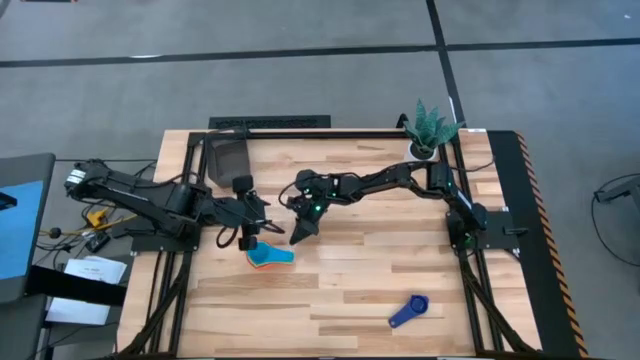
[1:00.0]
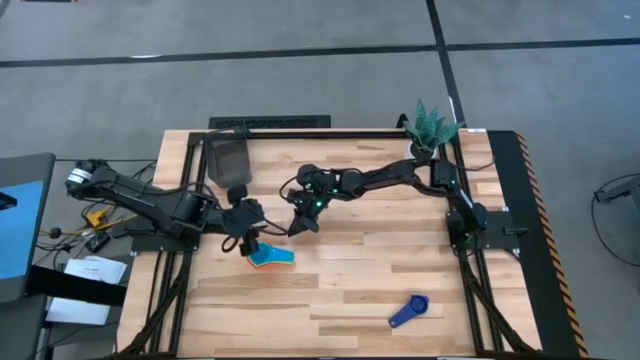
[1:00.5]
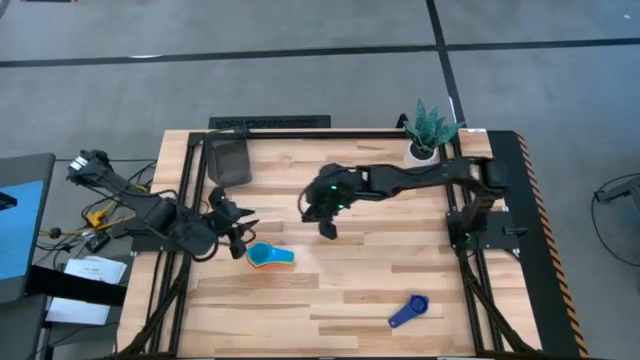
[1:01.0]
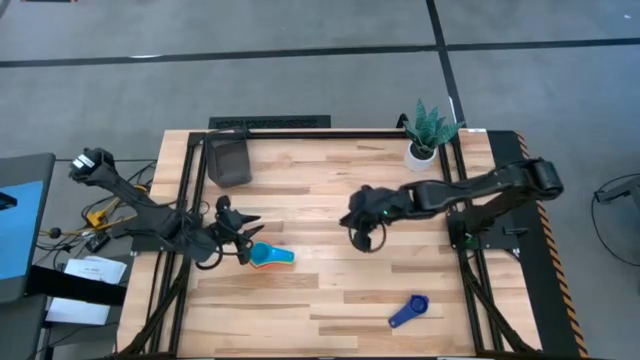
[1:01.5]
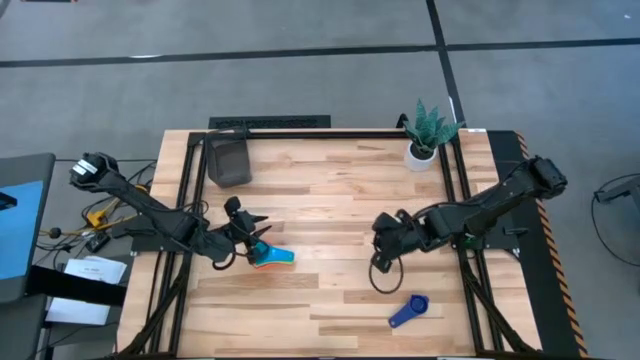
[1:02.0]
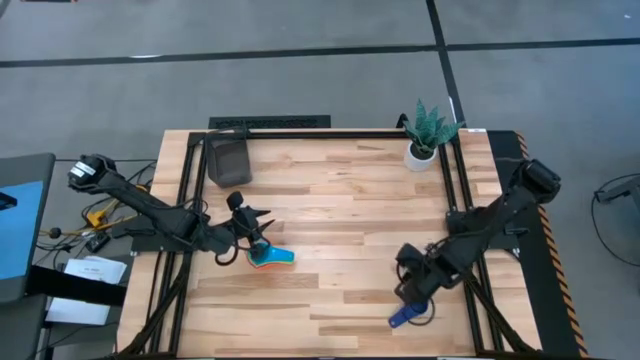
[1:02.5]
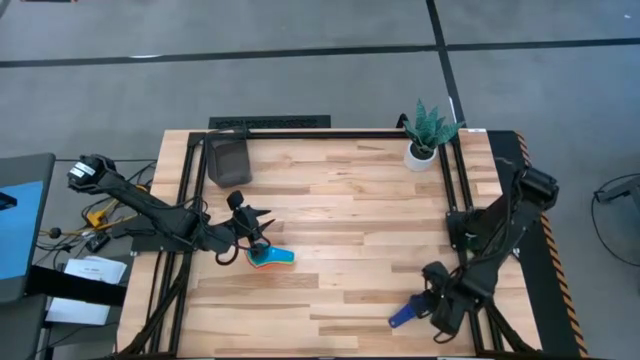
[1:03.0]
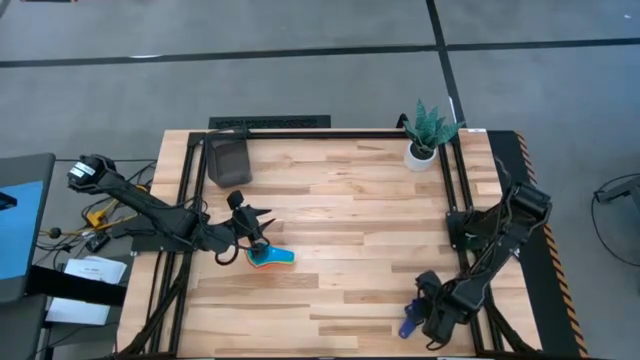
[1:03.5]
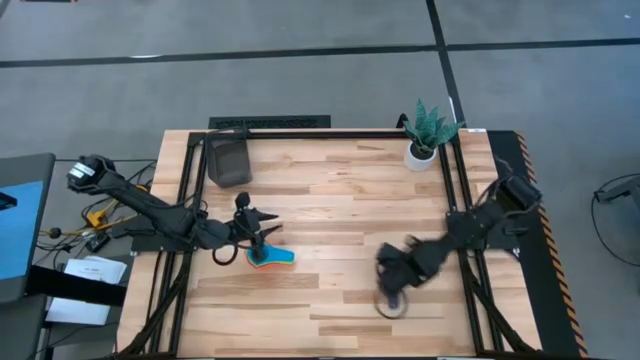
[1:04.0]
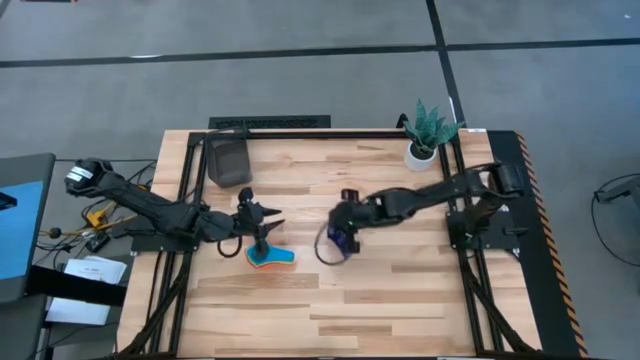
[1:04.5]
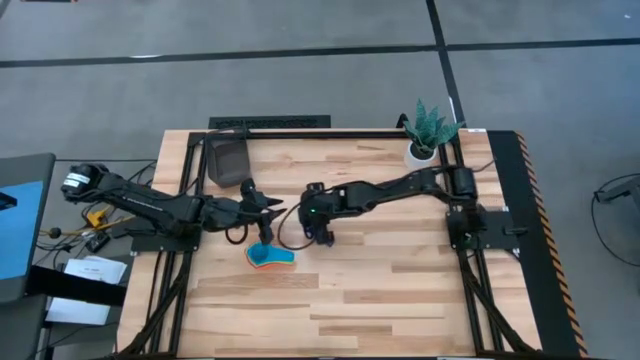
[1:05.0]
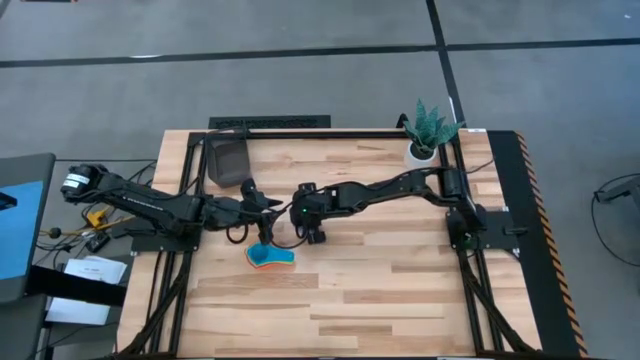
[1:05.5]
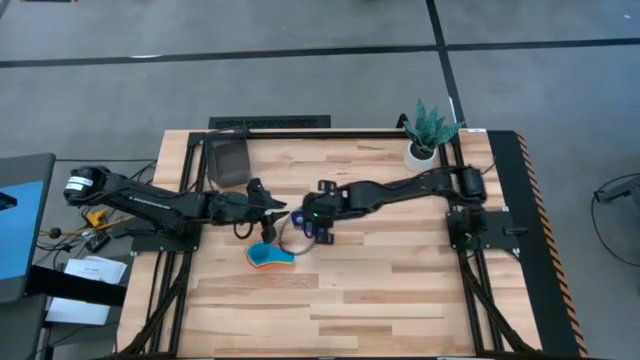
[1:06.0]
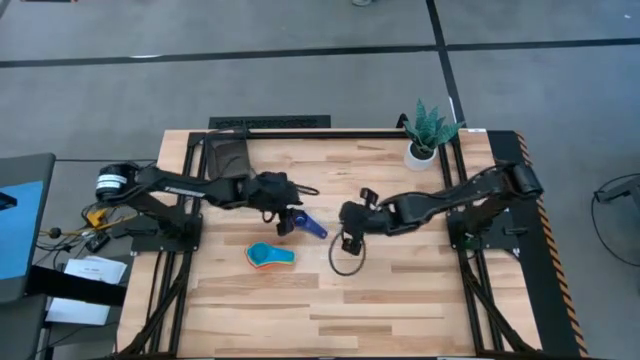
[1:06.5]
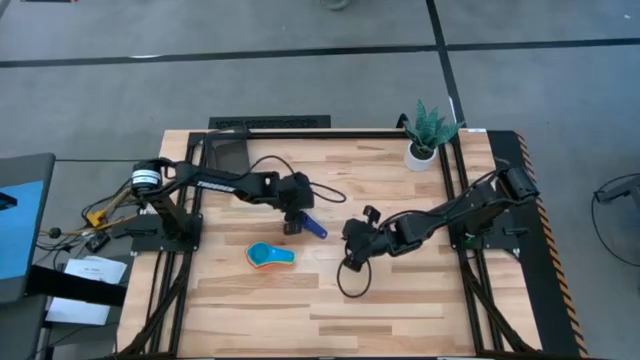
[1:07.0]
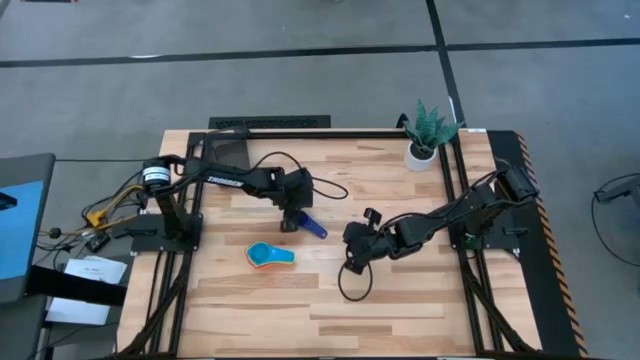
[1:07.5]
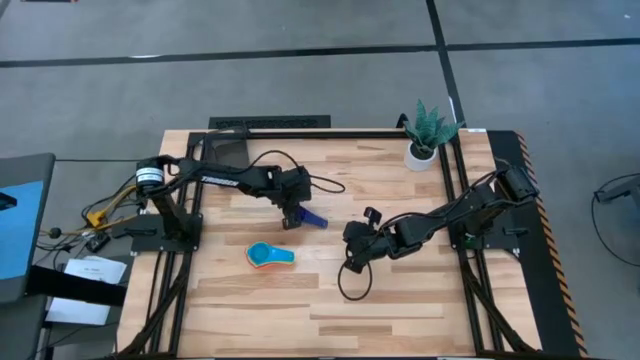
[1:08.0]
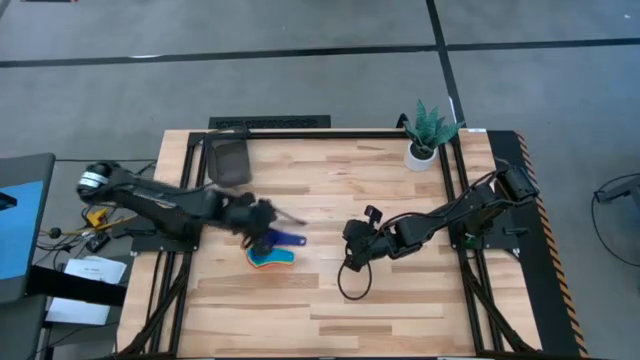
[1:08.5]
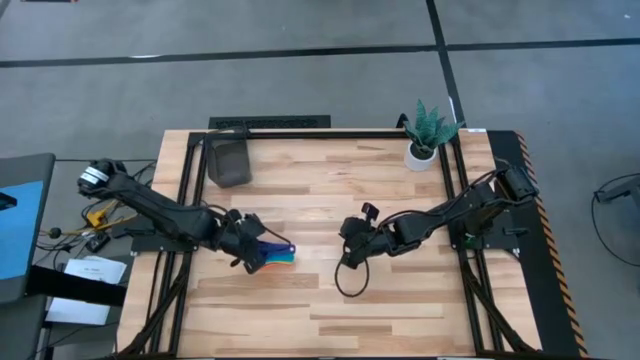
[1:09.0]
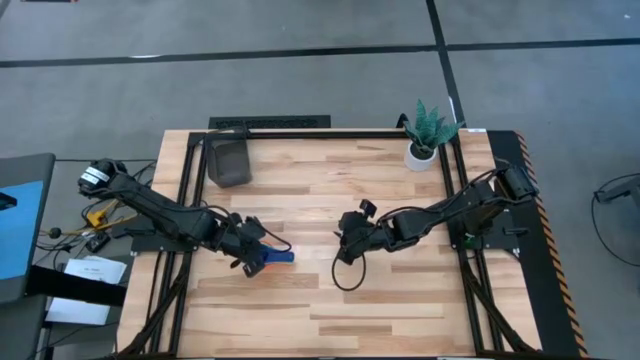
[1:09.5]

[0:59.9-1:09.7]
Task: Nest measuring cups in basket
Stack the dark blue measuring cup on top of the light blue measuring cup

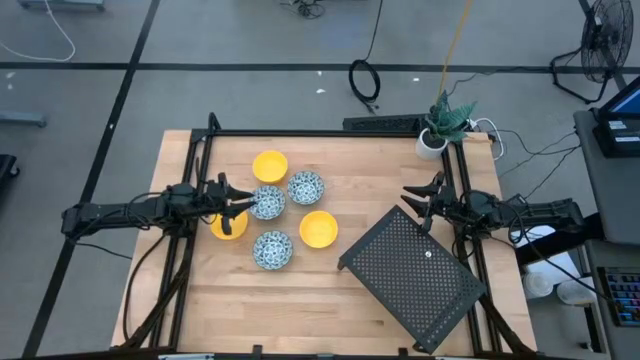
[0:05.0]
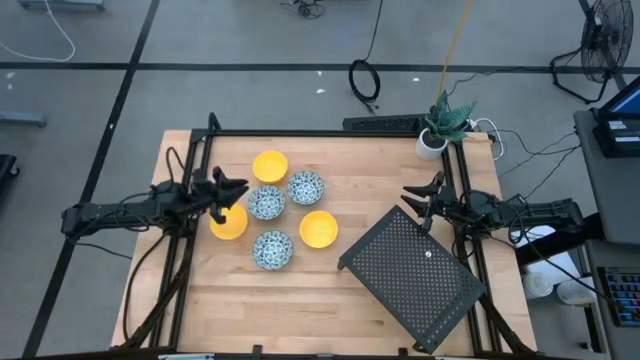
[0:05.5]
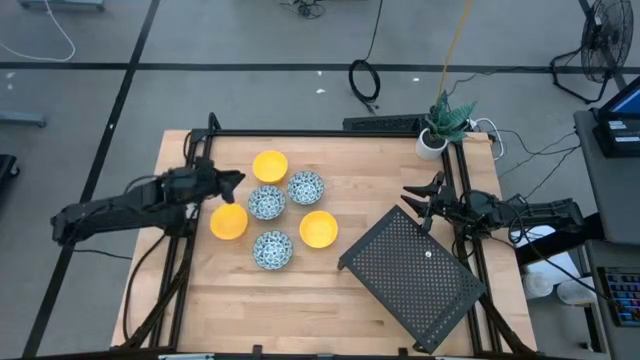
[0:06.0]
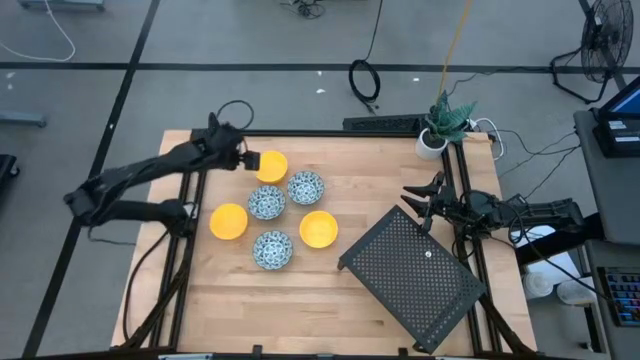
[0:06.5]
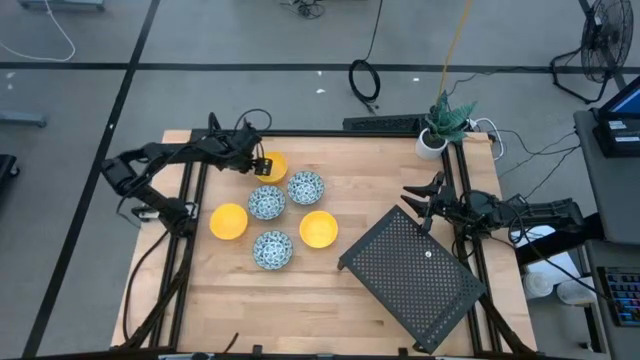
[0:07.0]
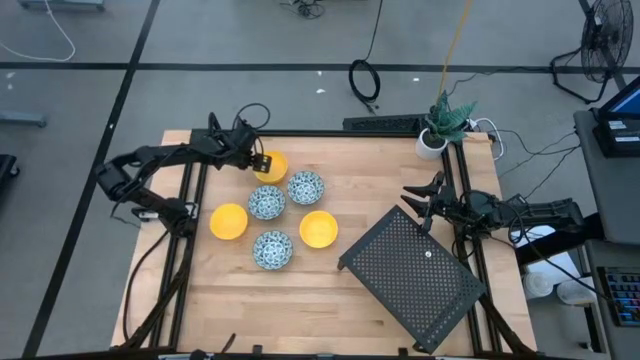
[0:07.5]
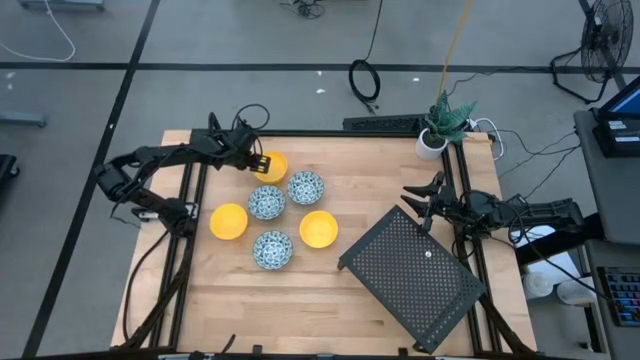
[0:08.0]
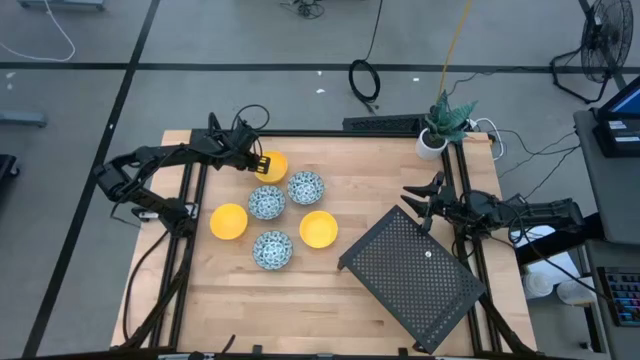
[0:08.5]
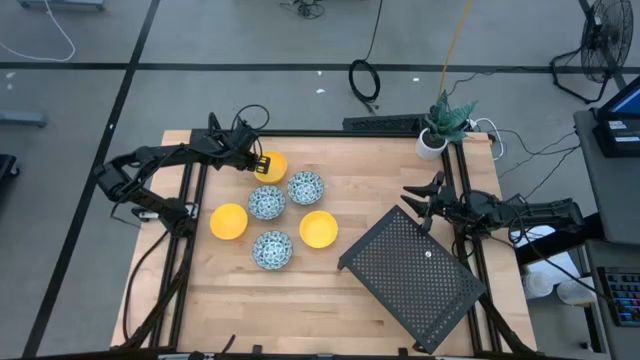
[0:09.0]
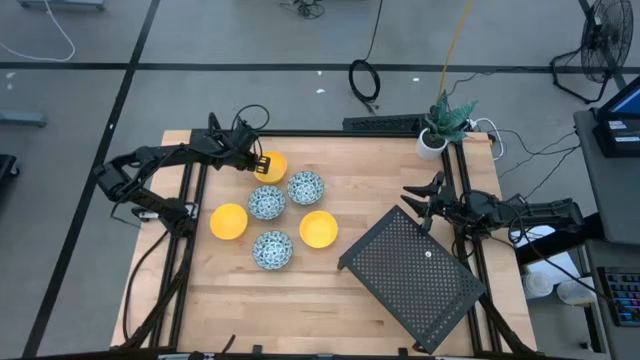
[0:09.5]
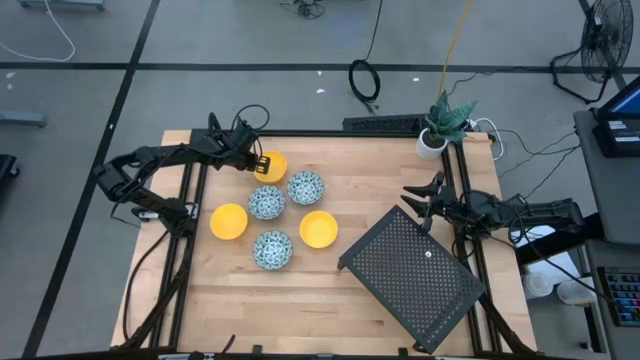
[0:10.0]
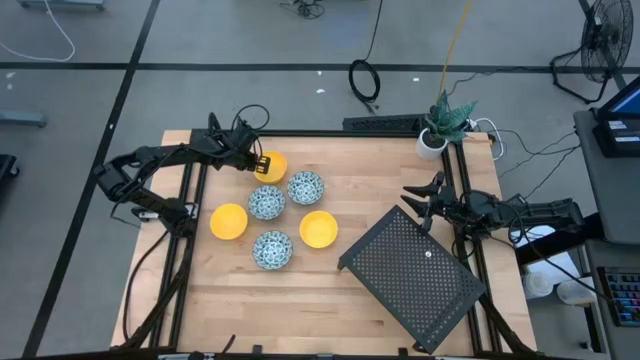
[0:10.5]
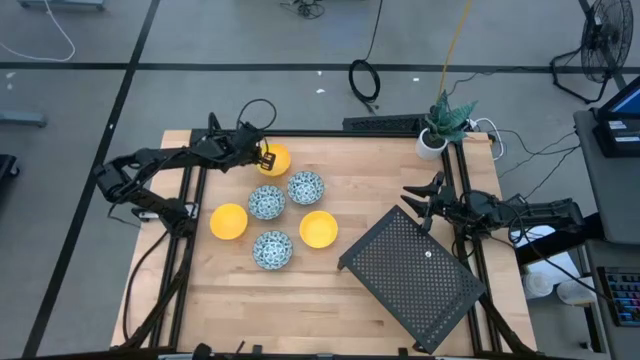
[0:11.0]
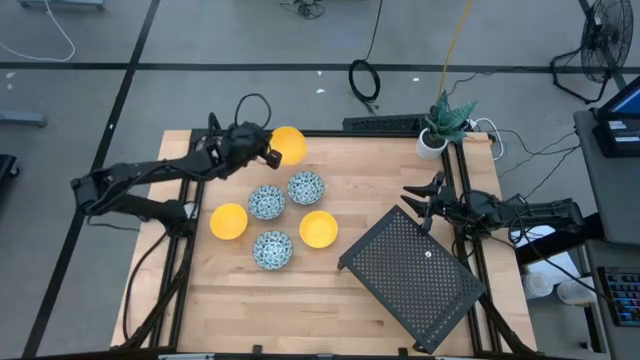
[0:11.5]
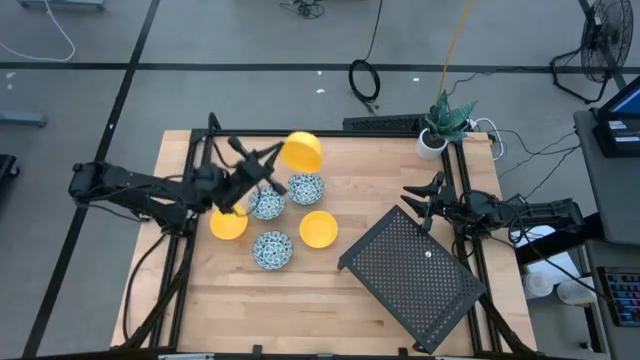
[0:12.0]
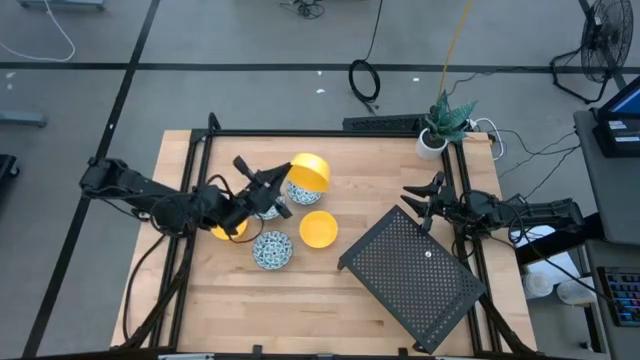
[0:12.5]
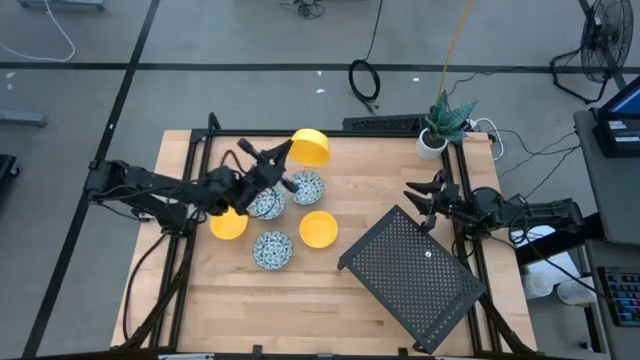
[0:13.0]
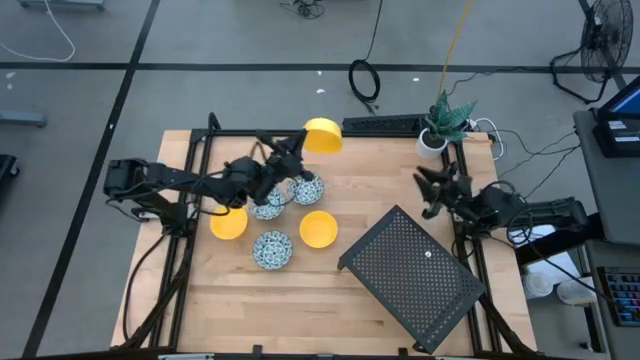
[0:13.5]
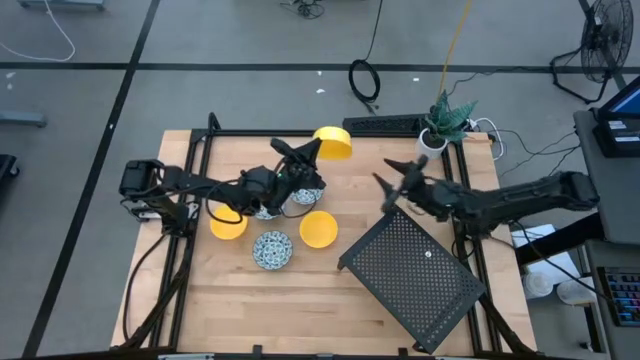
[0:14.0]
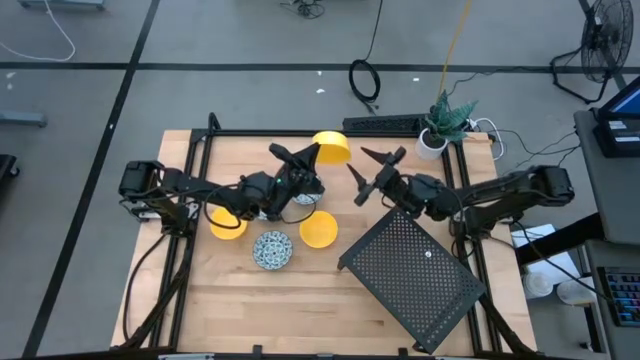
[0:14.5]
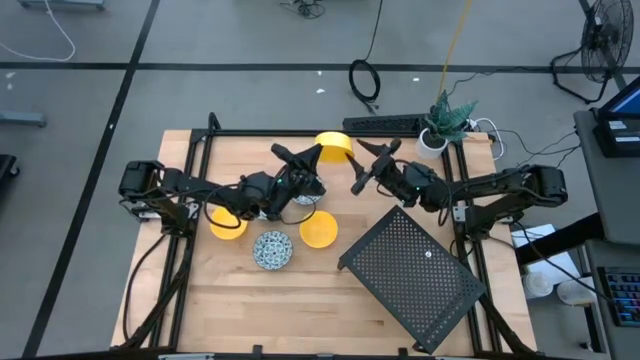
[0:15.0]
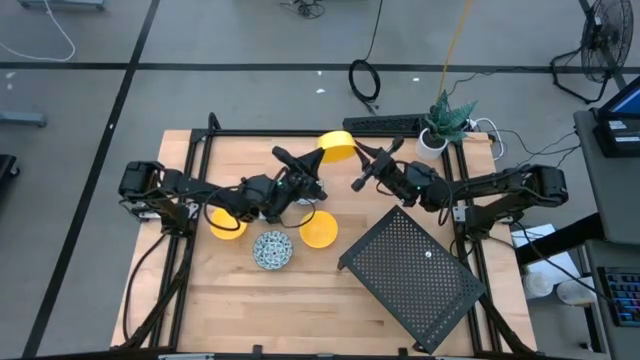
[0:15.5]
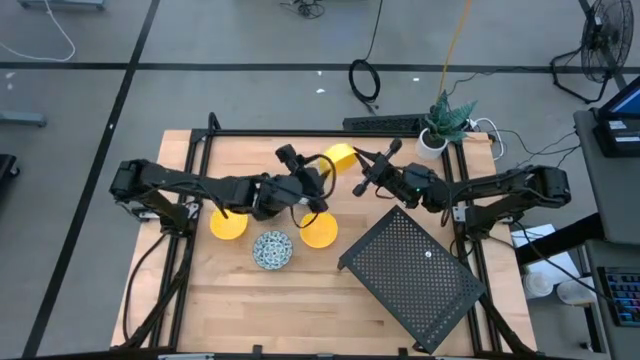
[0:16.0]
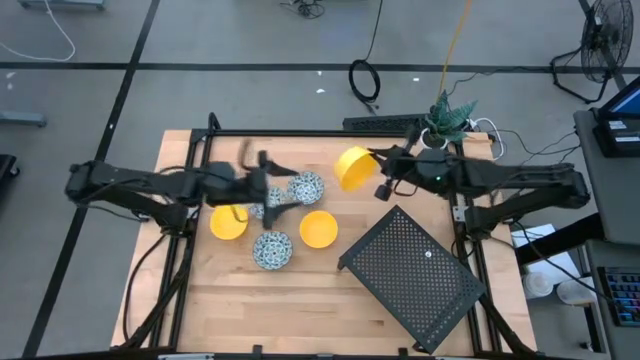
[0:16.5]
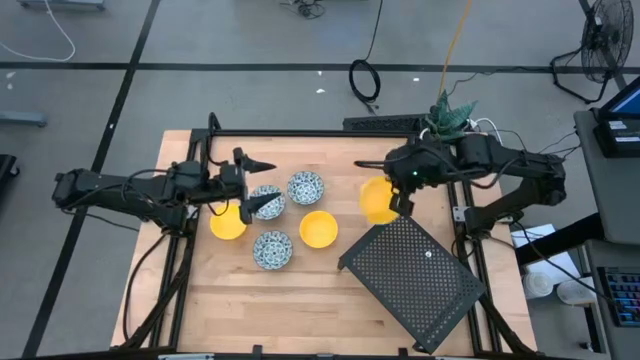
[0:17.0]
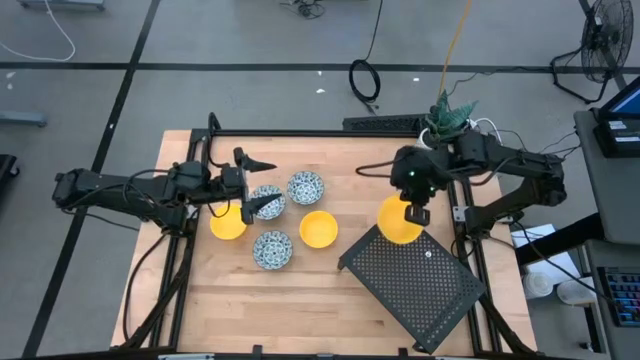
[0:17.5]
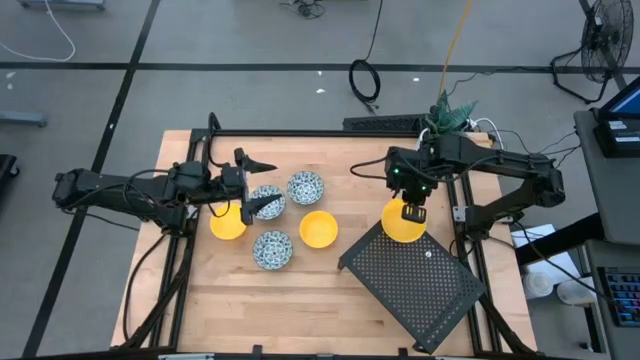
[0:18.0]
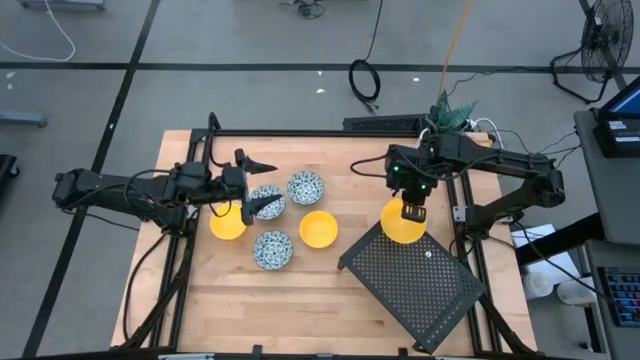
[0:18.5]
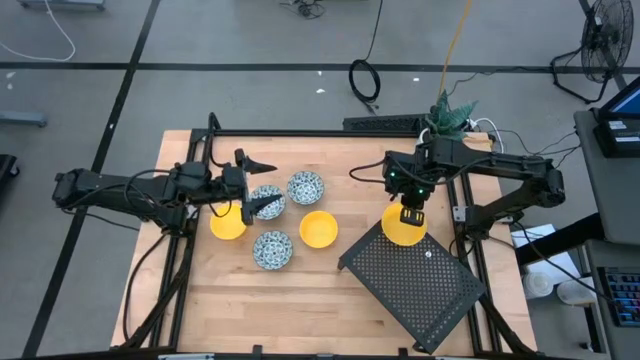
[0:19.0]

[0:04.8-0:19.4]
Task: Pick & Place Mini bowls
Put the top yellow bowl on the shelf
